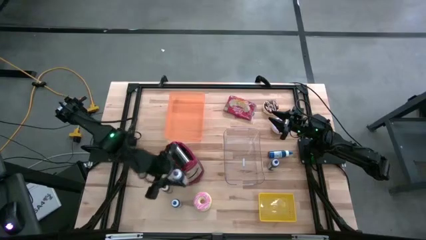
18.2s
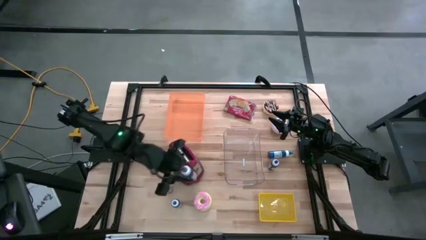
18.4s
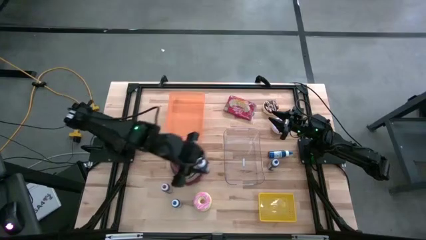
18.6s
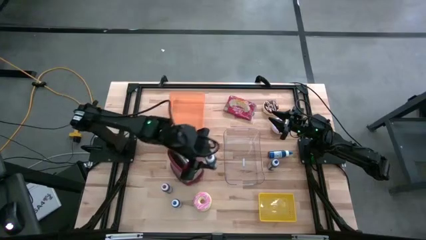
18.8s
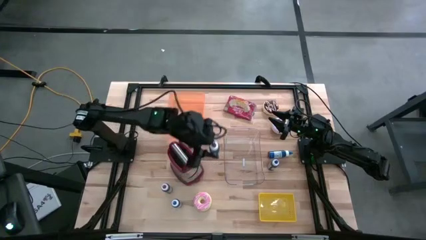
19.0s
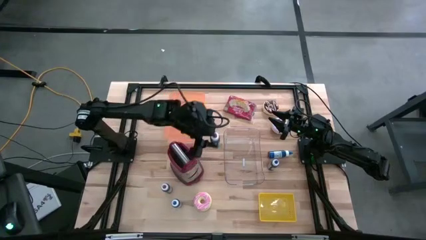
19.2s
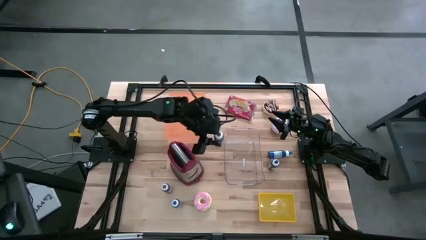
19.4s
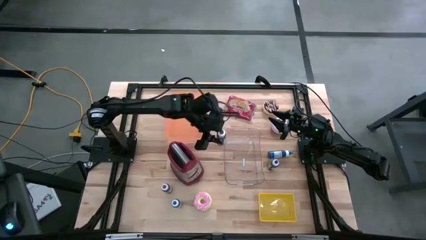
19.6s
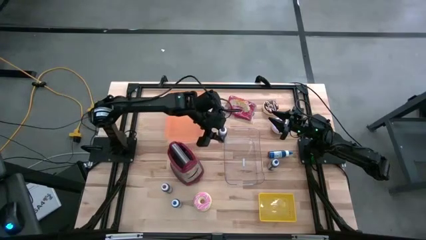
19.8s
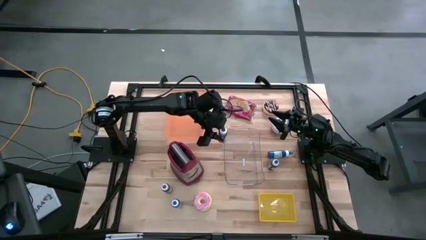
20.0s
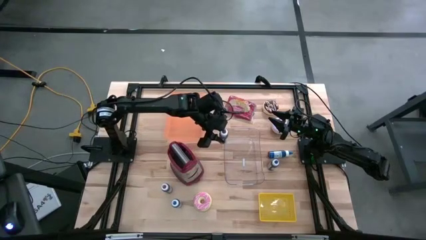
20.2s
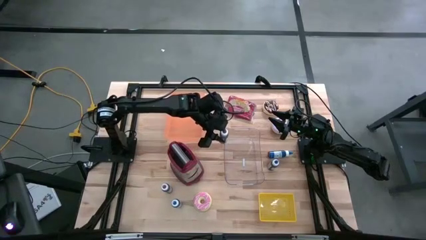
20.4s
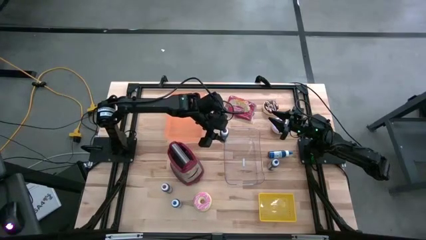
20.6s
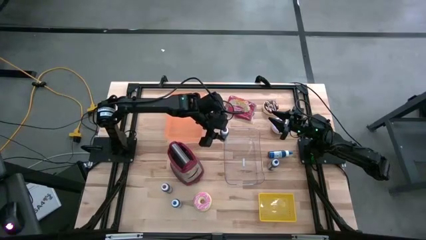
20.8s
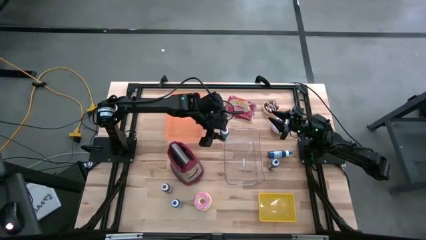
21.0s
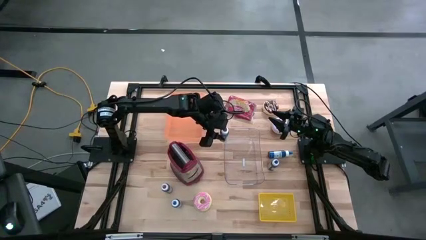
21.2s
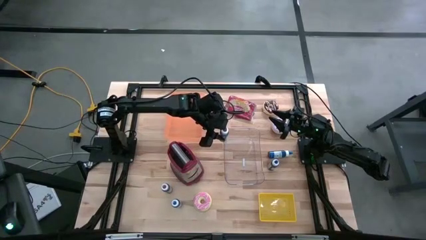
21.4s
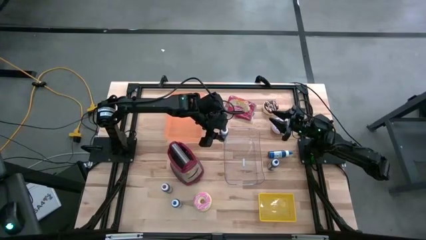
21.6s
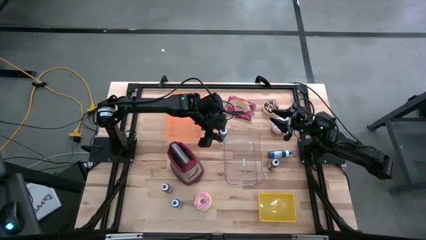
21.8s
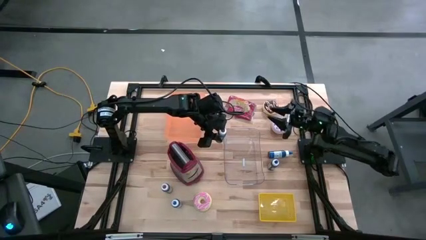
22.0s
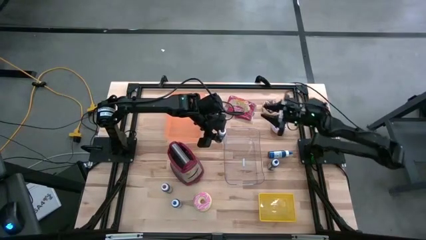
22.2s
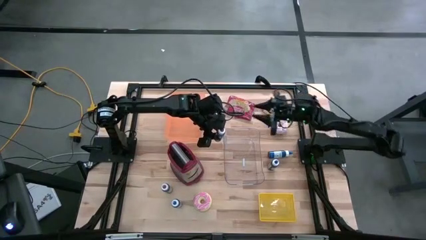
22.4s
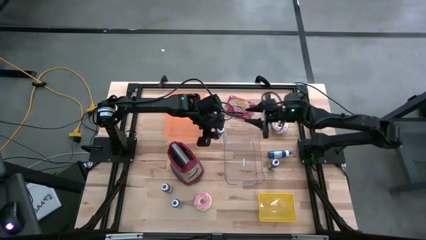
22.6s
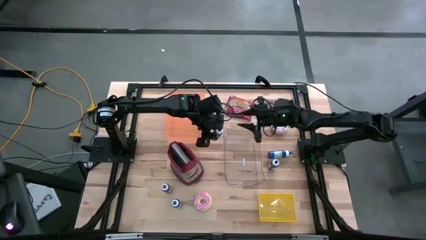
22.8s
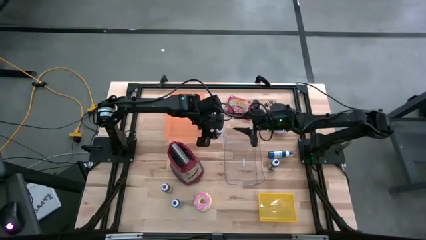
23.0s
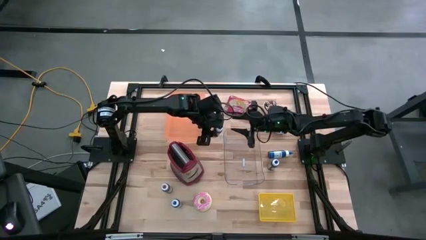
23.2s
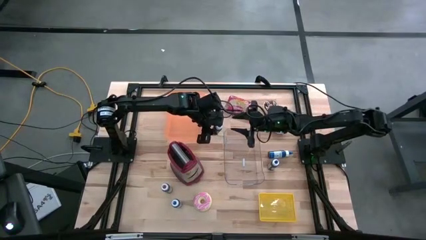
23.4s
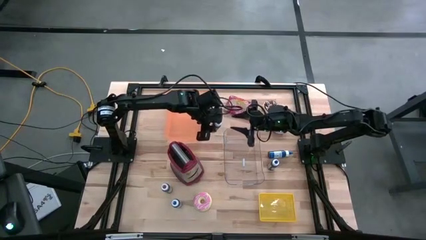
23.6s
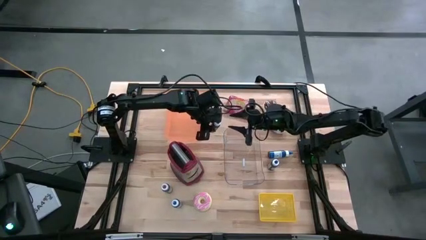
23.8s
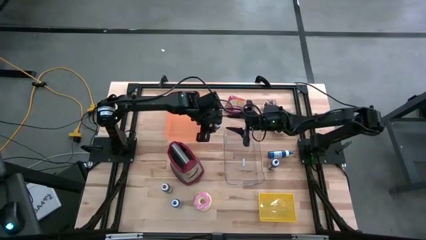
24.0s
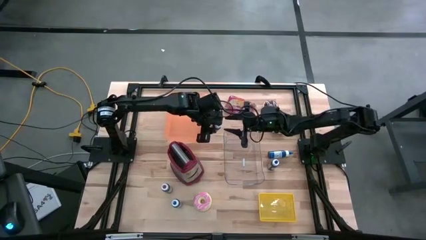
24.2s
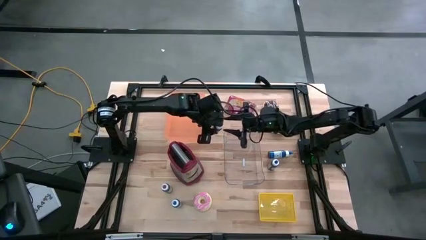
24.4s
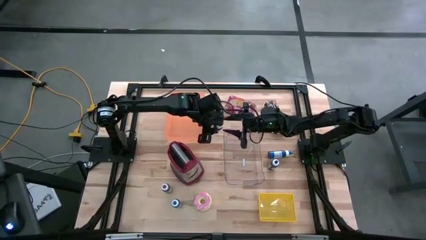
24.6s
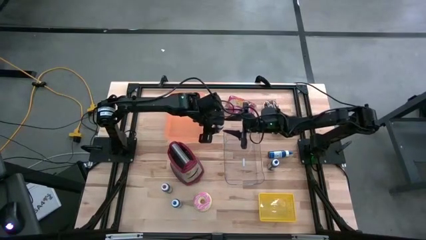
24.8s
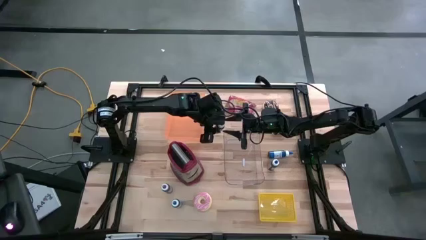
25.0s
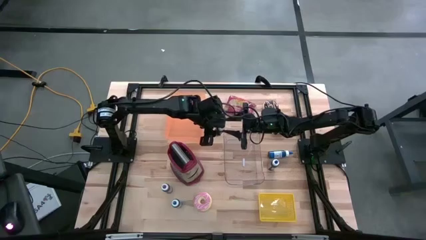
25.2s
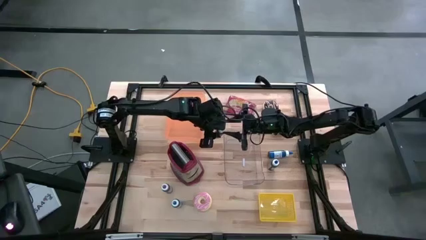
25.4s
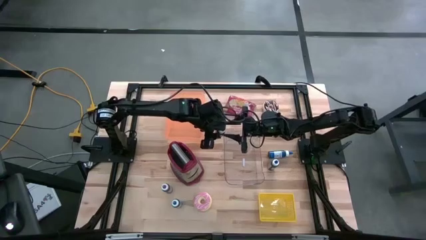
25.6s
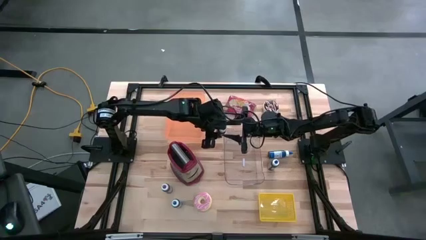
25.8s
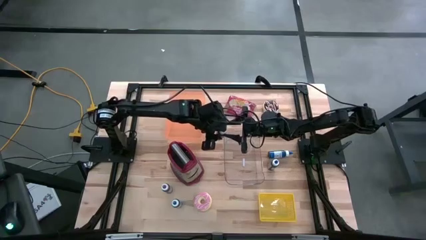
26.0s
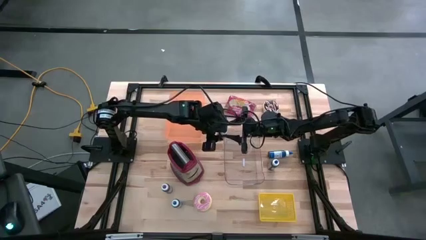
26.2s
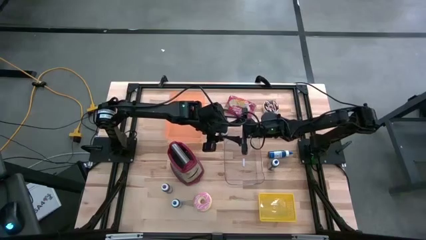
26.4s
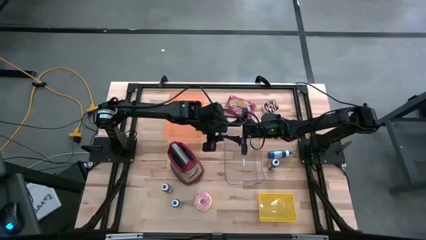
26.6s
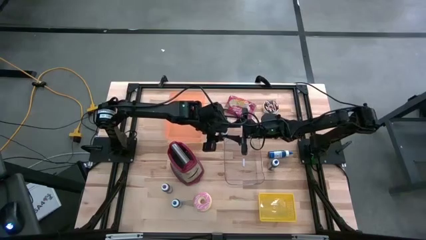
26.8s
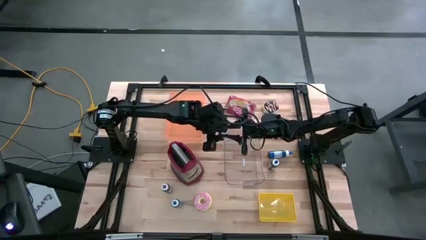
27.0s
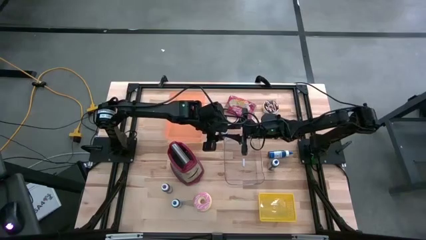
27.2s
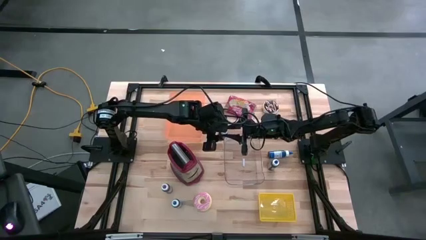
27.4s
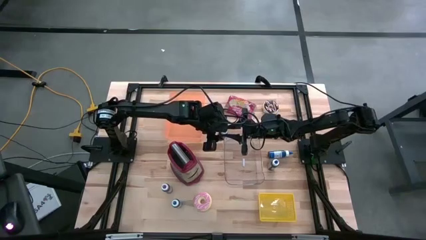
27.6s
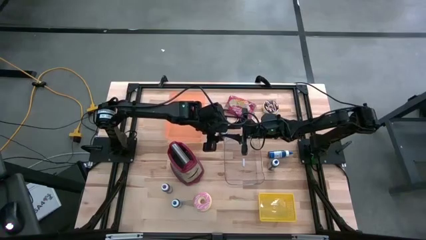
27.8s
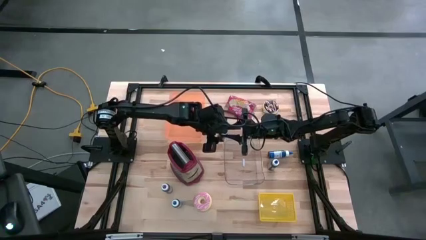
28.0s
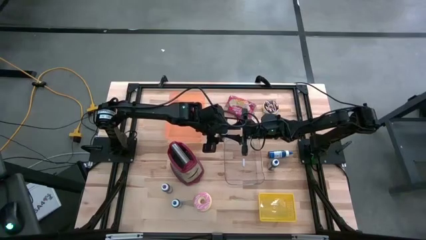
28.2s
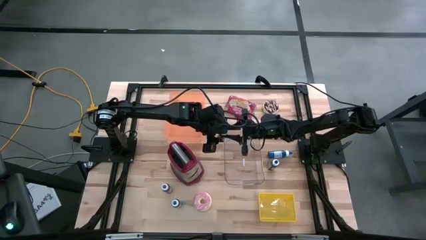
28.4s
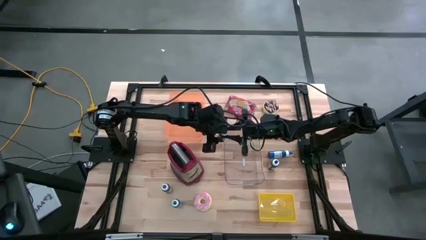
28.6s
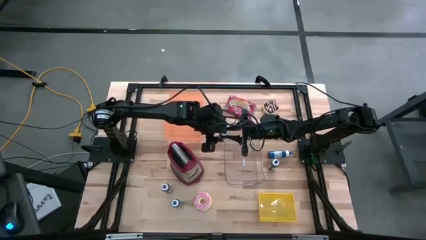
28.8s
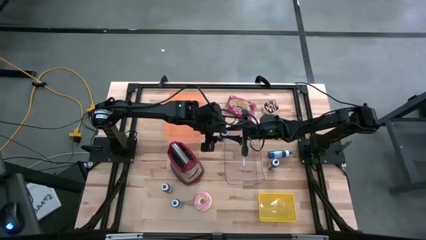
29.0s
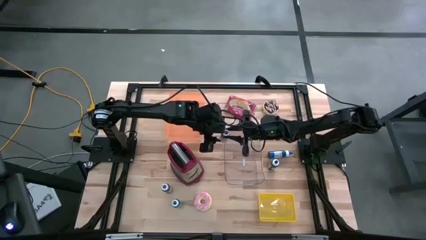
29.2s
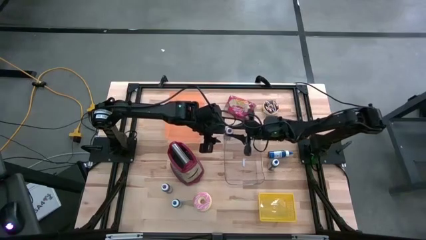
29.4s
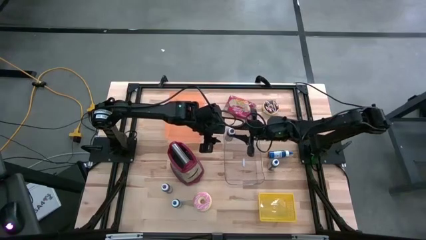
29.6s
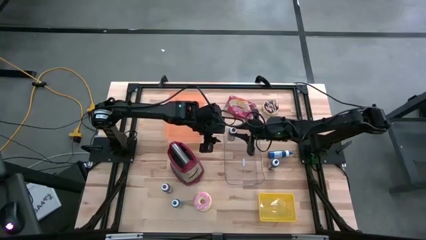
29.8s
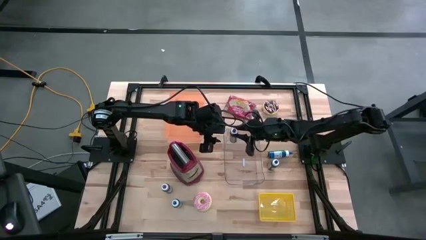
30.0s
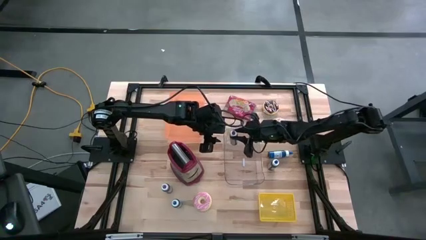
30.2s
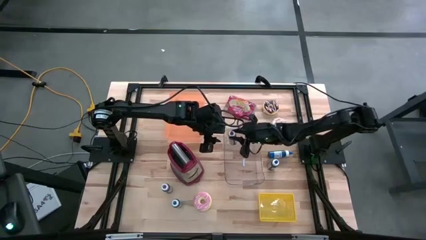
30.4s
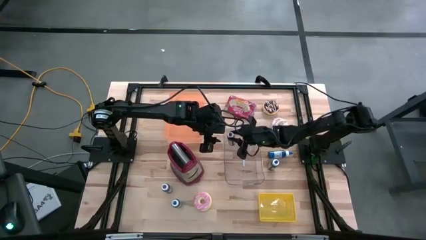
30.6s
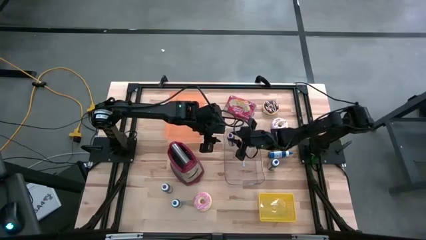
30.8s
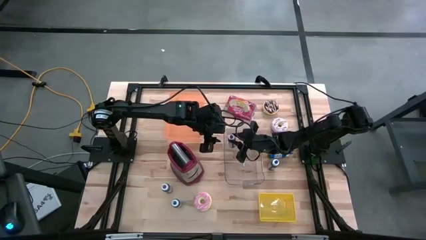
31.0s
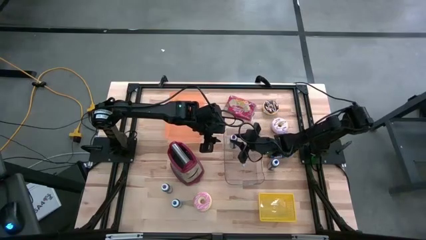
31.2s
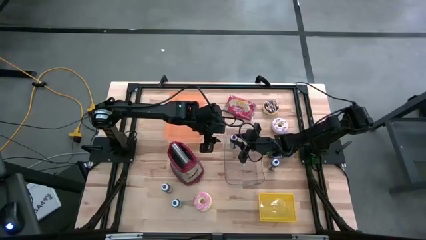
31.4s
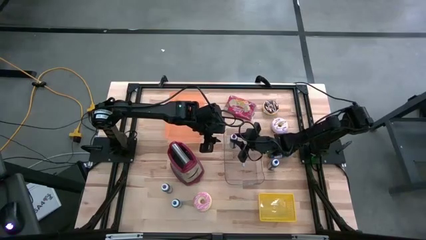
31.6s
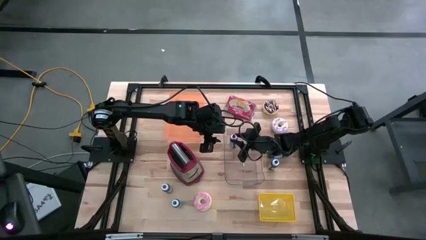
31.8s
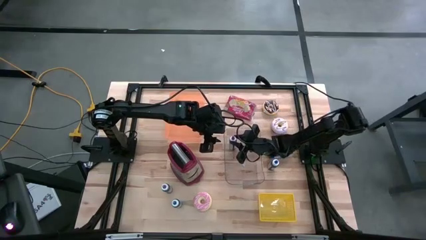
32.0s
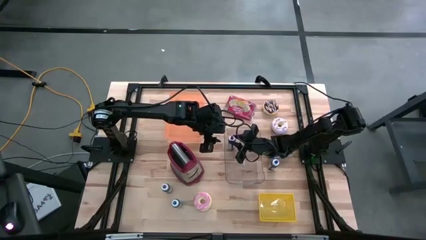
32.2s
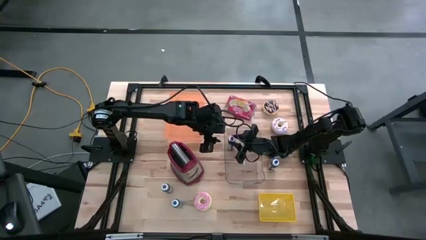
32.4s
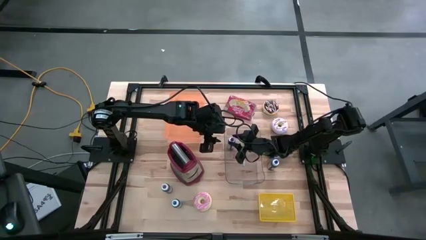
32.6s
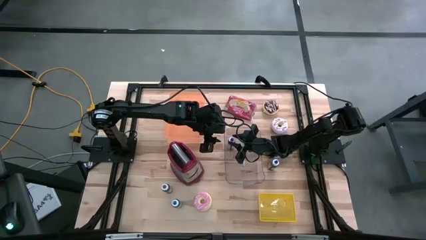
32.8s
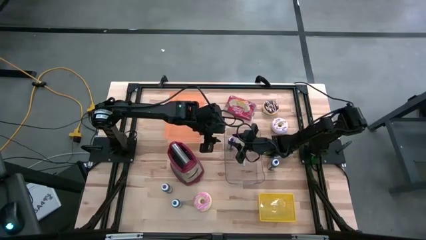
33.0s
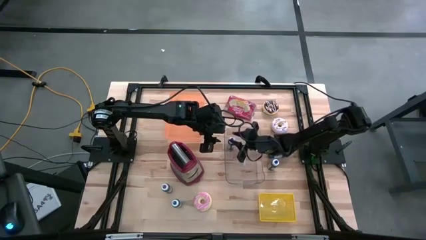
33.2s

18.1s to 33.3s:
Task: Pick & Place Food Item
Put the bottom purple food coloring bottle into the transparent bin
